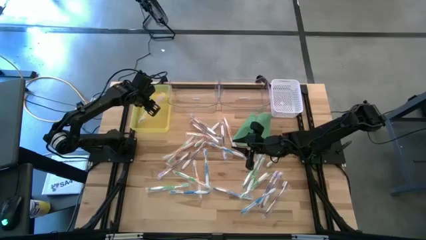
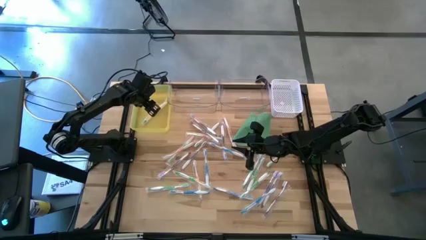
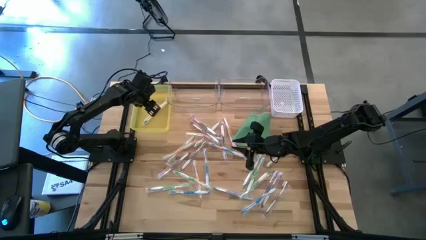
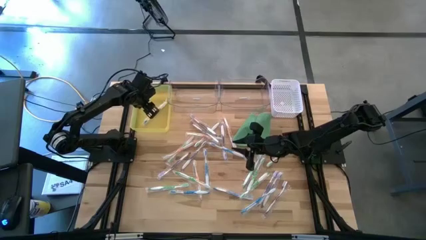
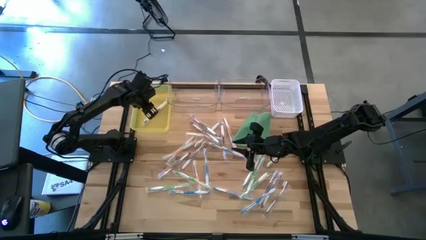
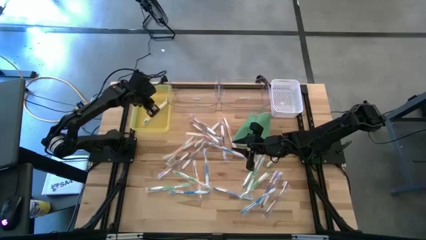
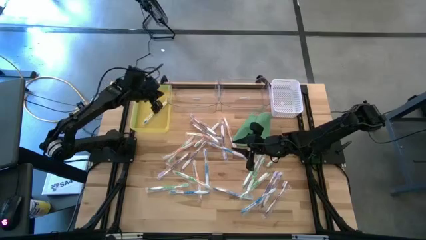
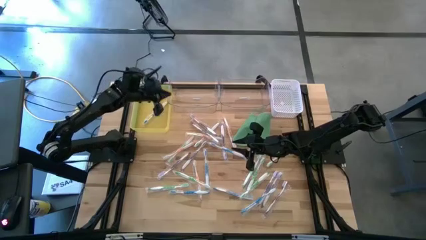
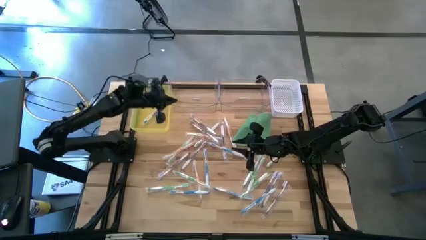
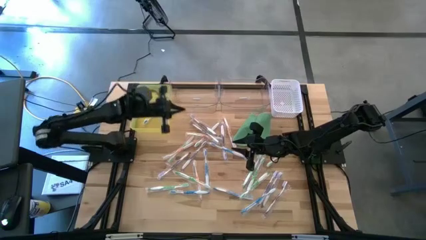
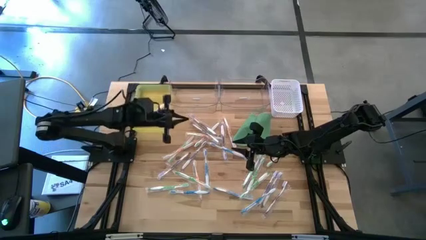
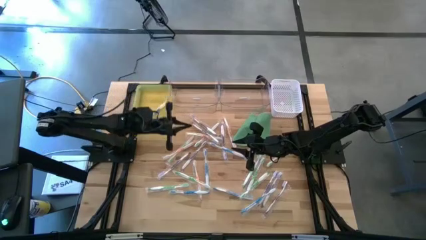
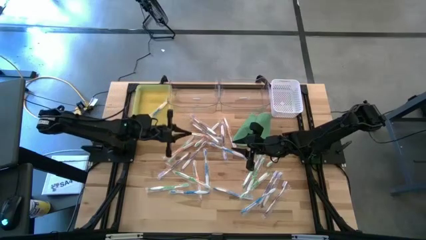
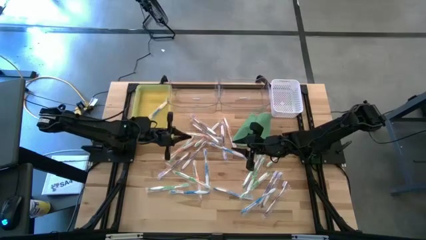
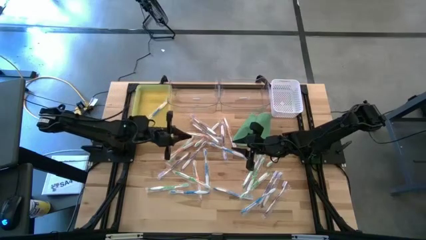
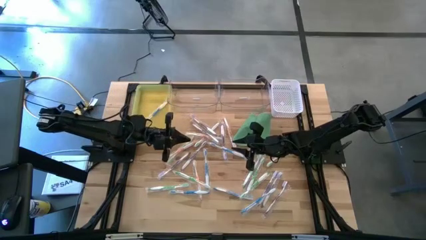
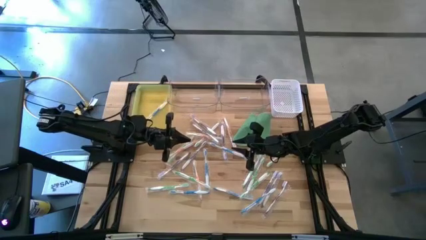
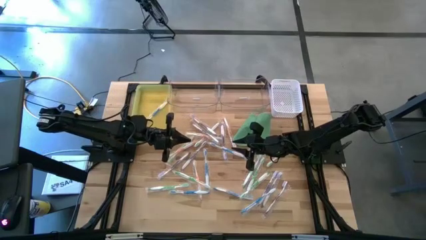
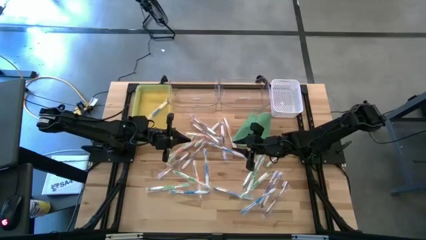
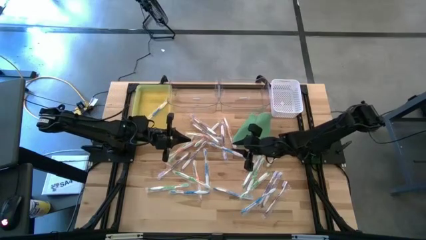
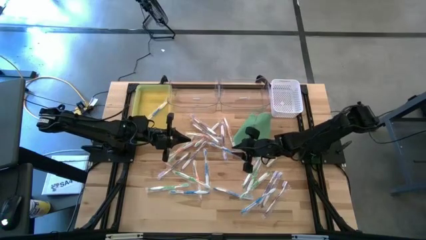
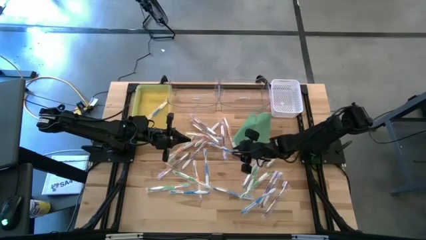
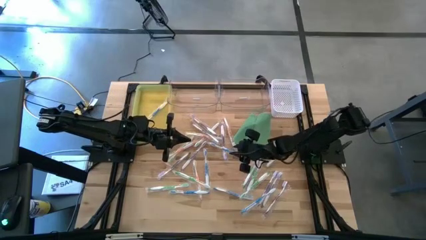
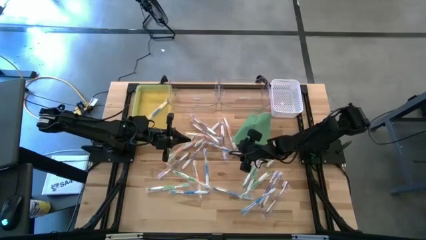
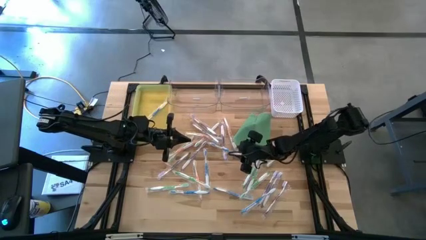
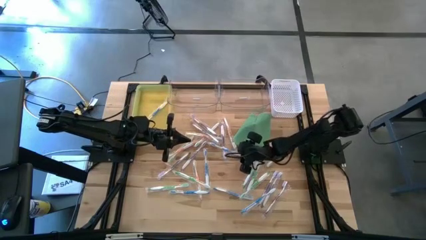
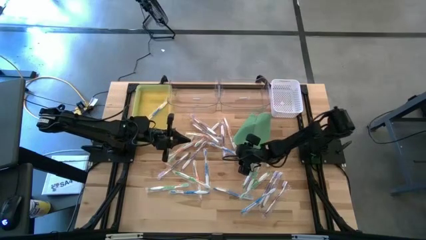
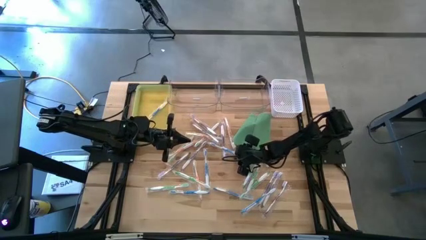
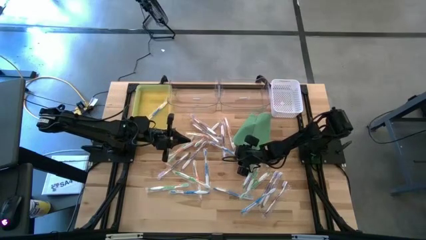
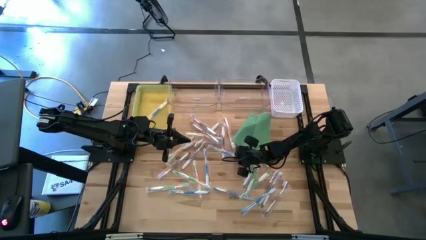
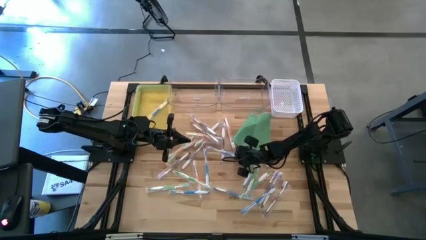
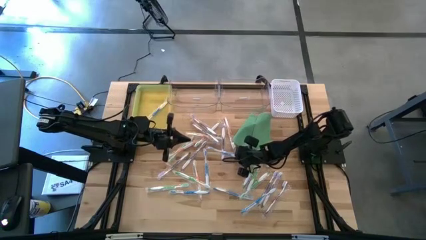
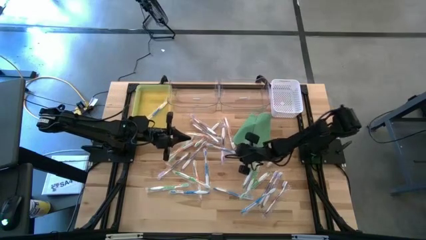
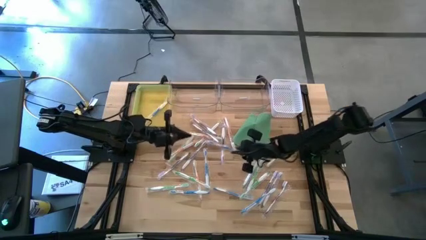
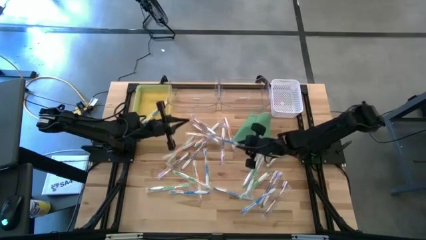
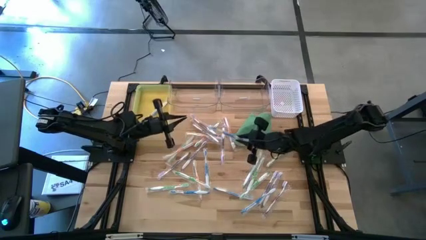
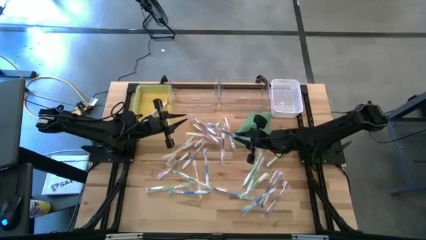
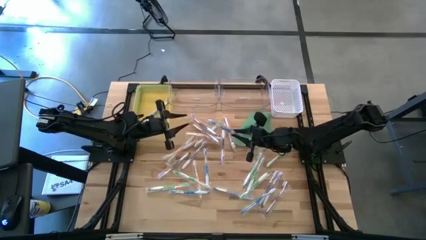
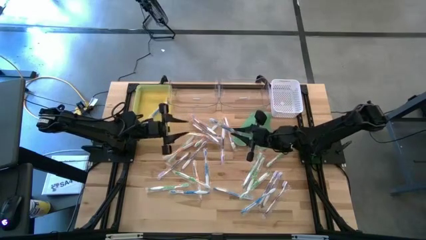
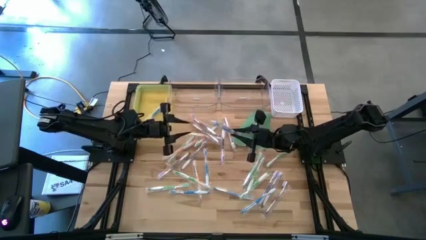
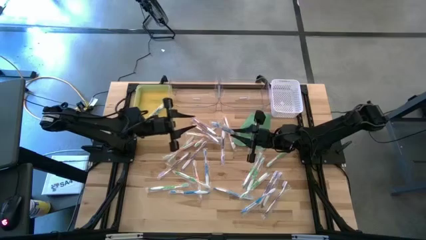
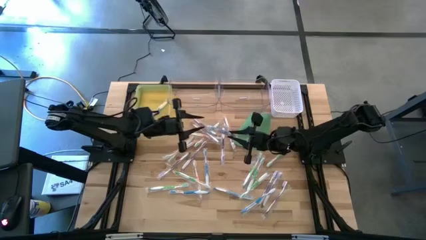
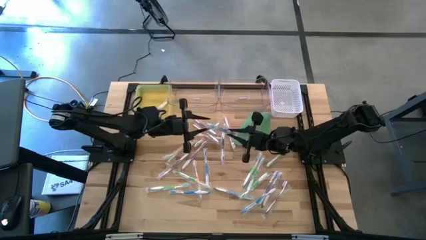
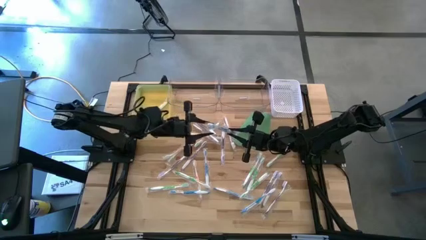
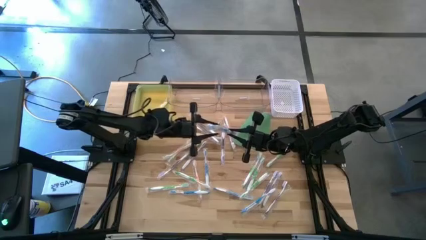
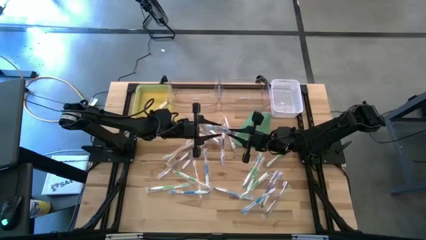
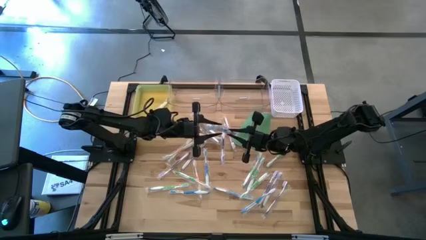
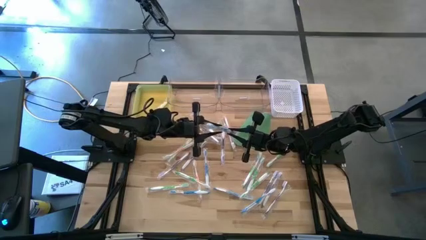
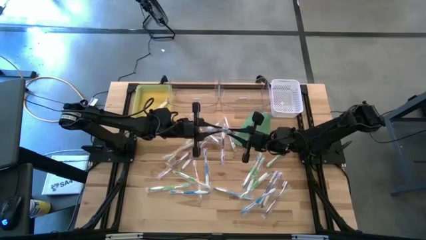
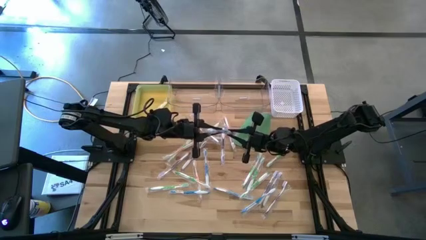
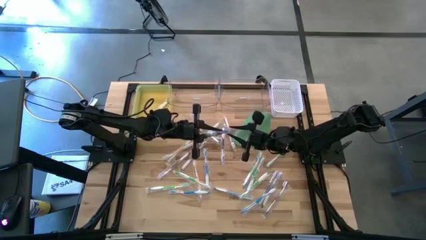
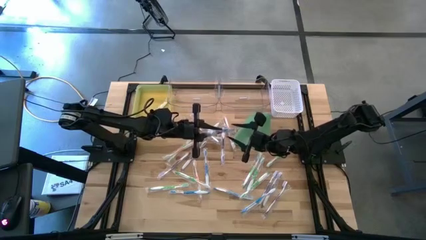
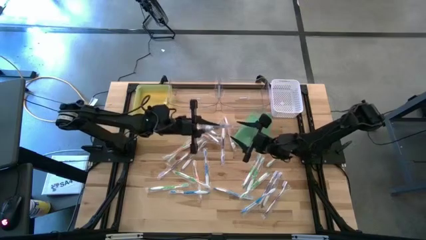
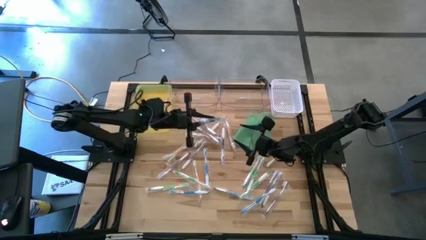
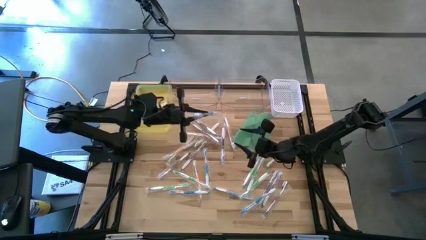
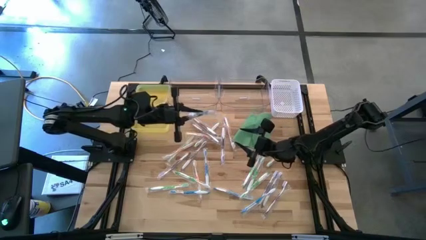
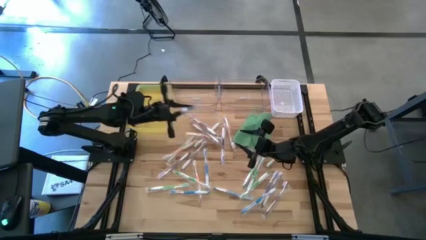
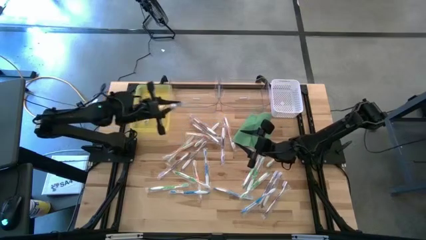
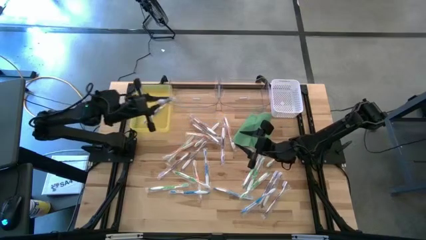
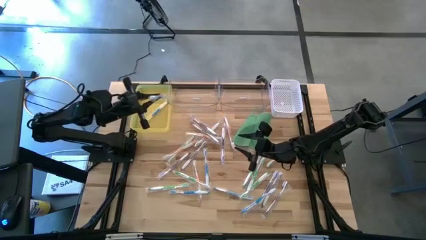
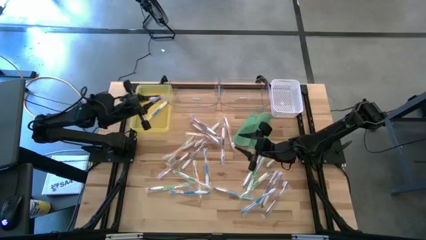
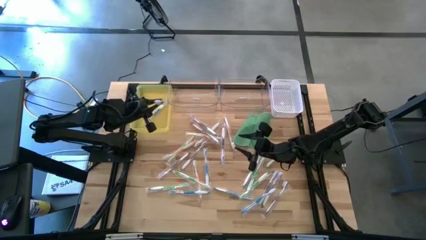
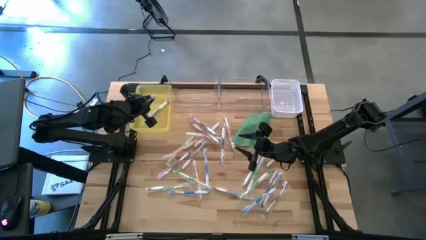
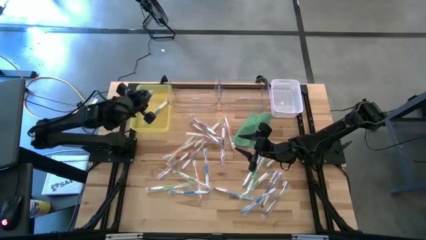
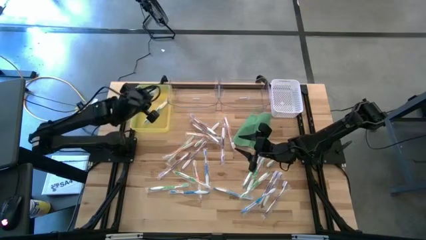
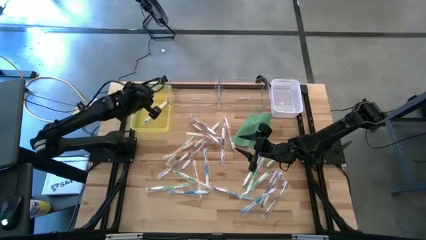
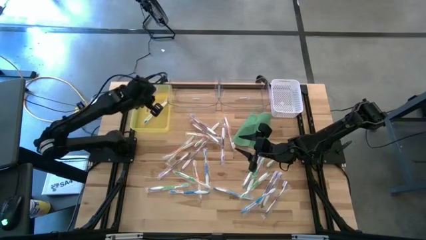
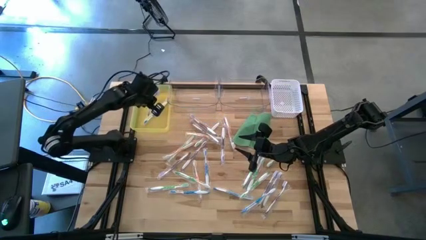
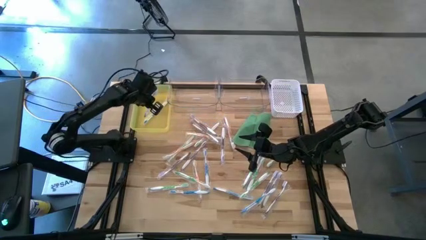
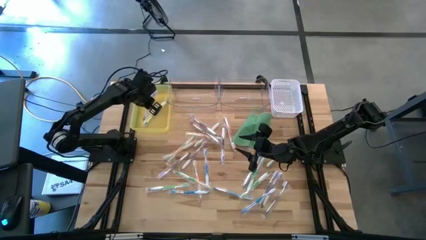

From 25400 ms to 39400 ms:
Task: Pick & Place Toothbrushes
Put the blue toothbrush into the yellow bin
